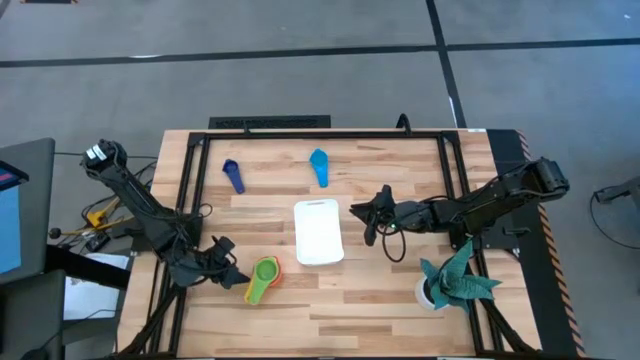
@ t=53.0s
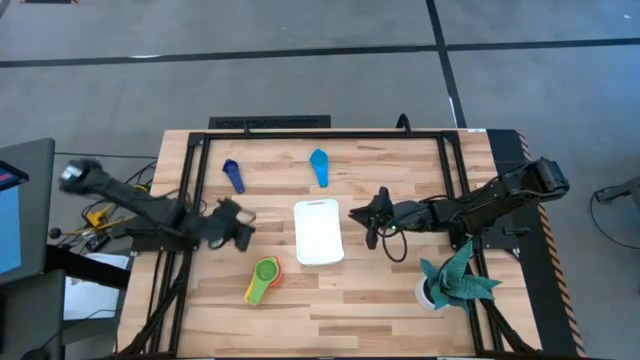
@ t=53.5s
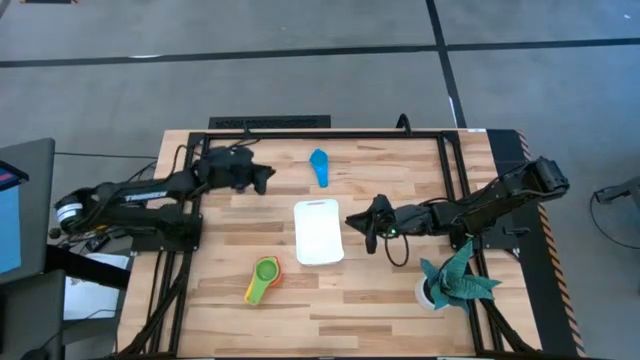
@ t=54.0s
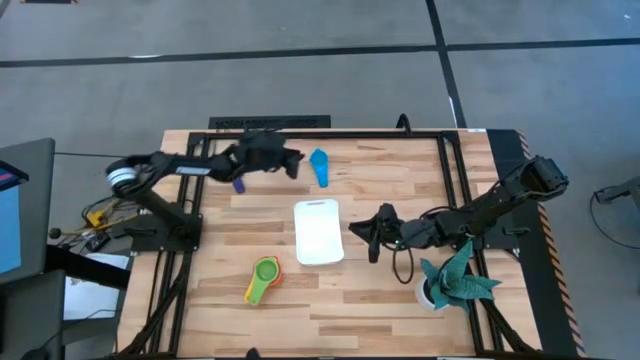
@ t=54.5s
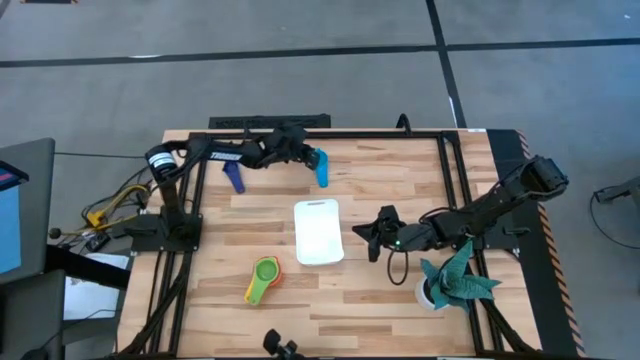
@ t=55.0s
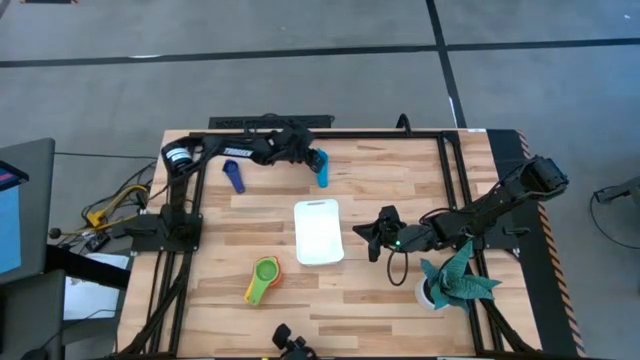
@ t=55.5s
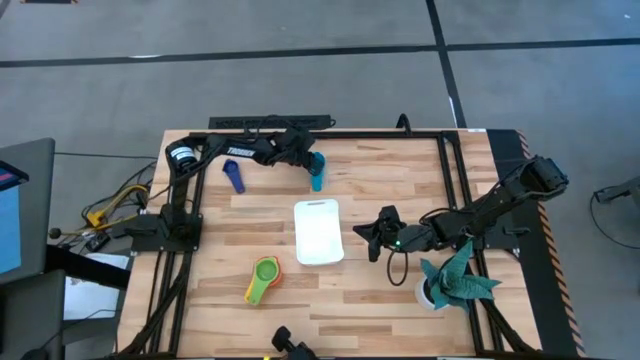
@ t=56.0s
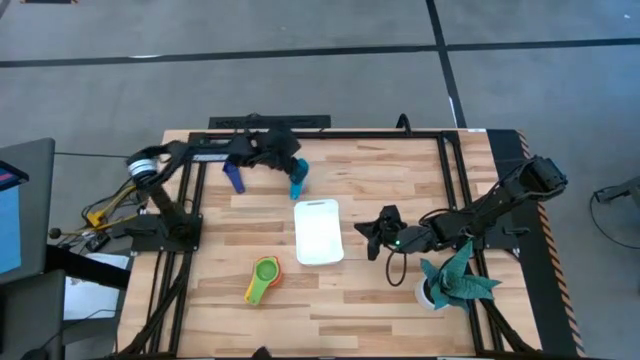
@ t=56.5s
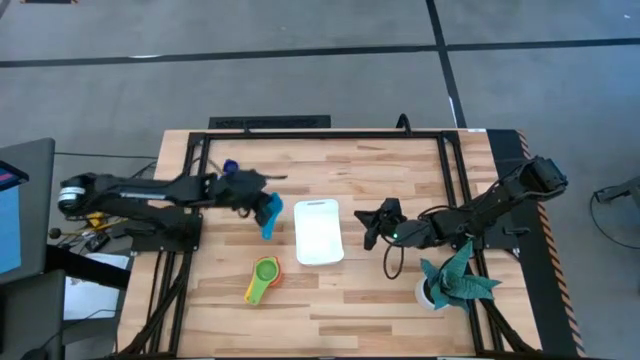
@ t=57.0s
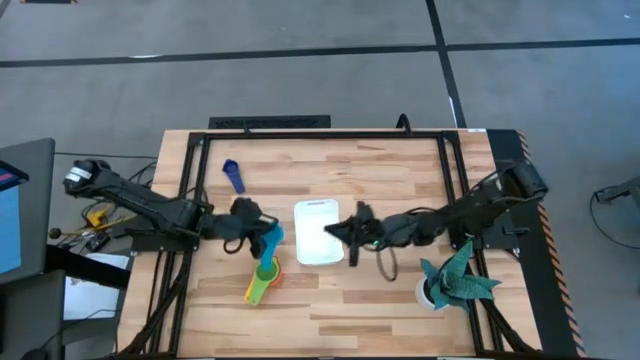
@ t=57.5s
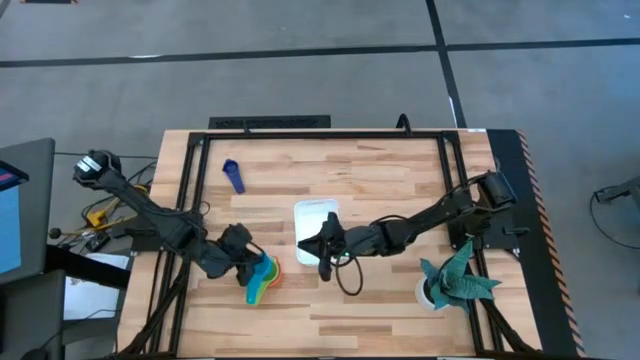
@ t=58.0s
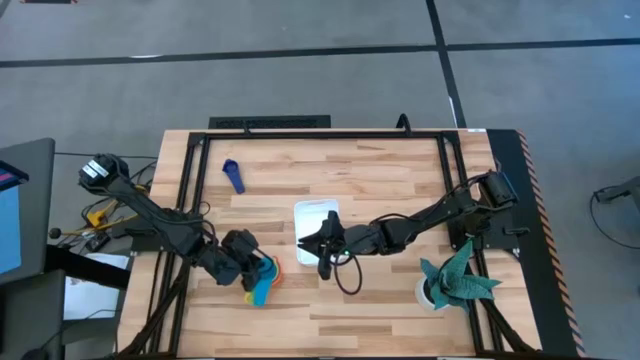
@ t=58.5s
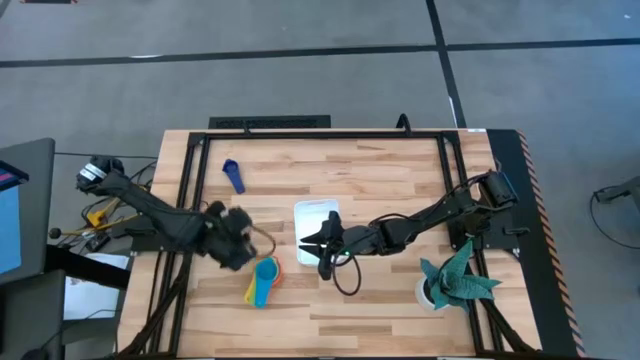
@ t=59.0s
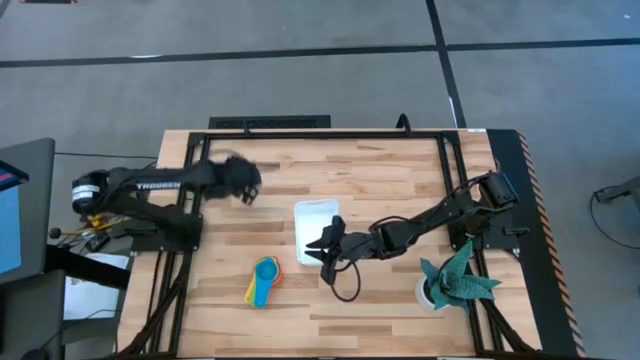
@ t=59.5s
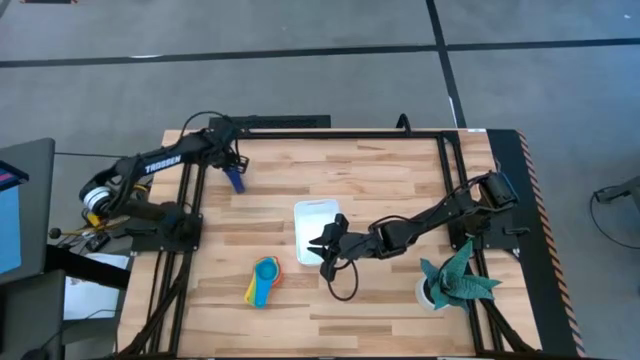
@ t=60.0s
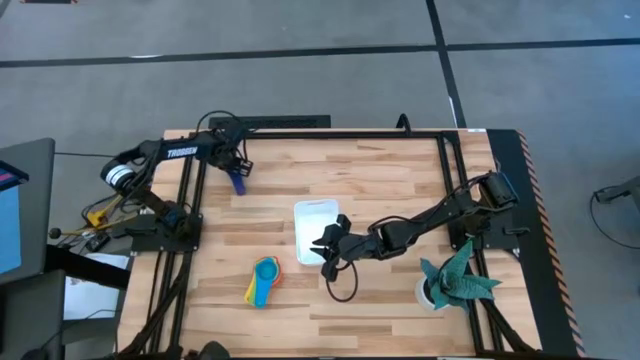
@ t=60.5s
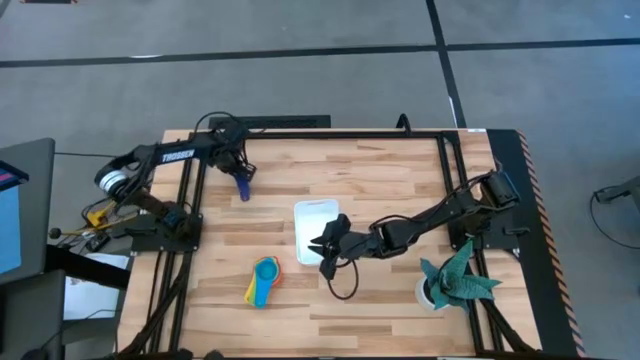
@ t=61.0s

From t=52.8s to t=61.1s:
Task: Nest measuring cups in basket
Stack the light blue nest measuring cup into the green nest measuring cup

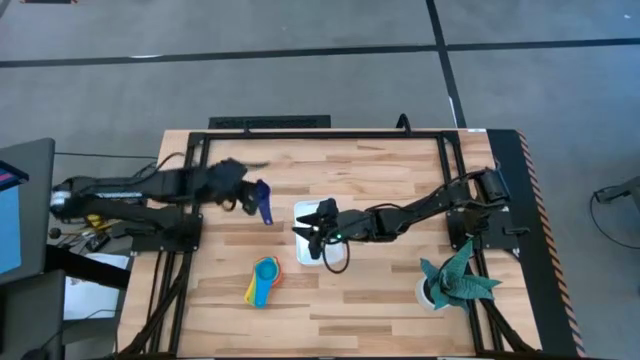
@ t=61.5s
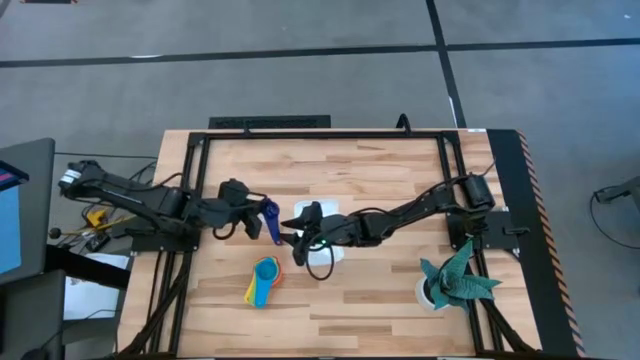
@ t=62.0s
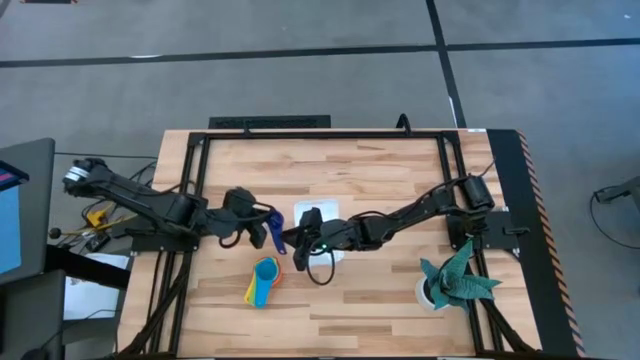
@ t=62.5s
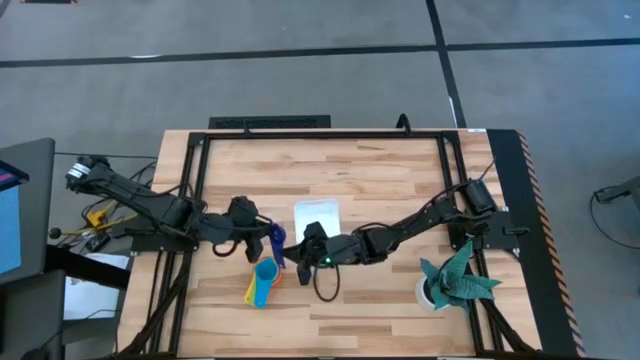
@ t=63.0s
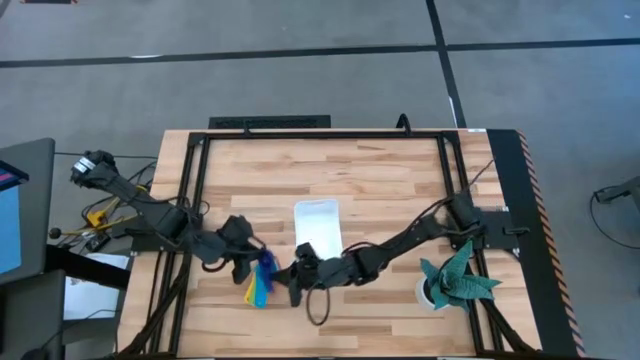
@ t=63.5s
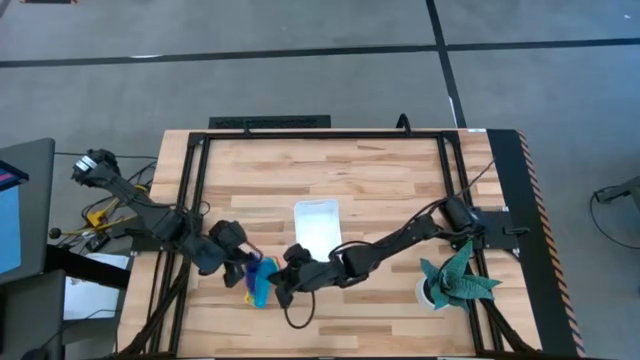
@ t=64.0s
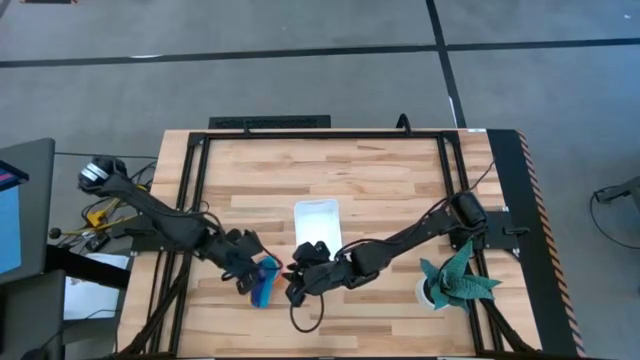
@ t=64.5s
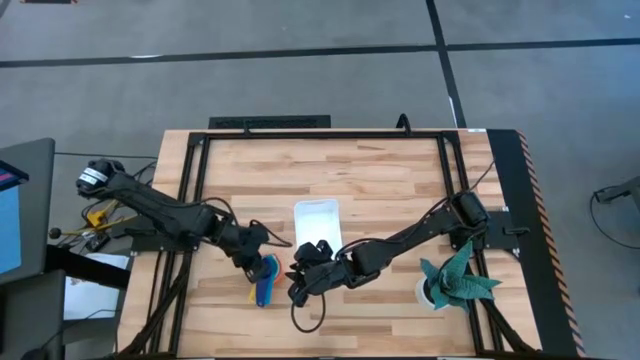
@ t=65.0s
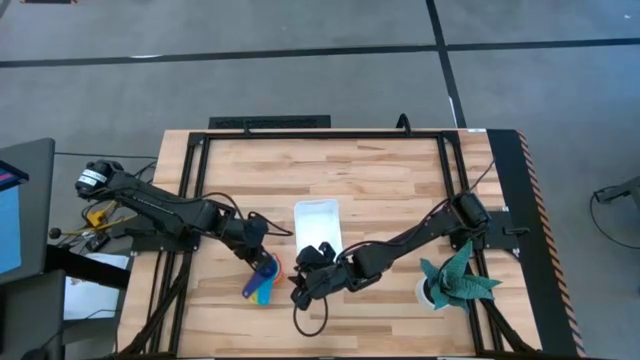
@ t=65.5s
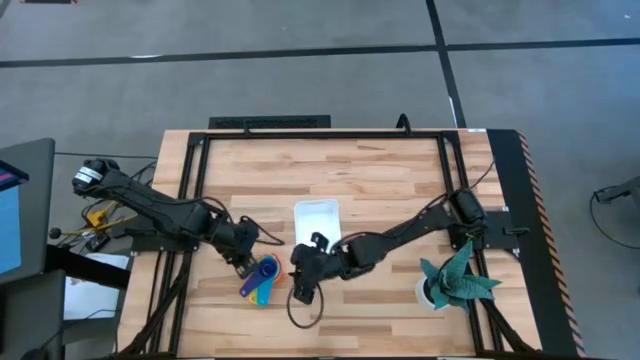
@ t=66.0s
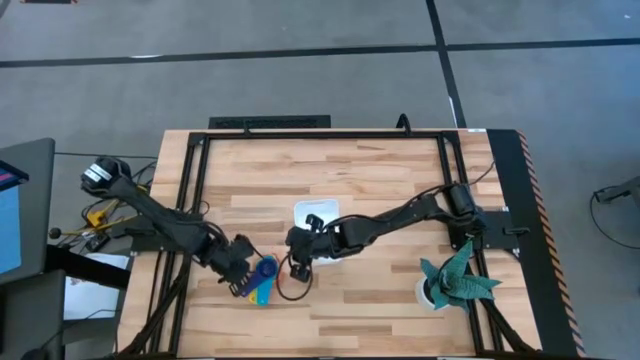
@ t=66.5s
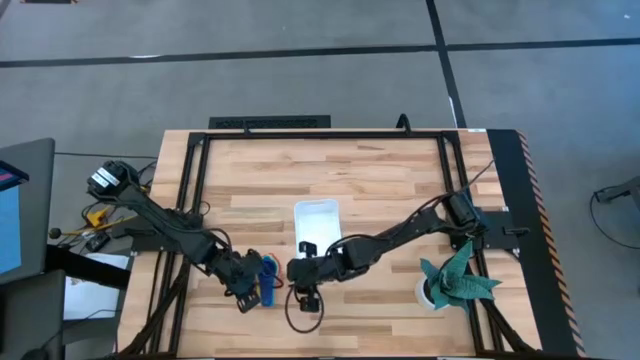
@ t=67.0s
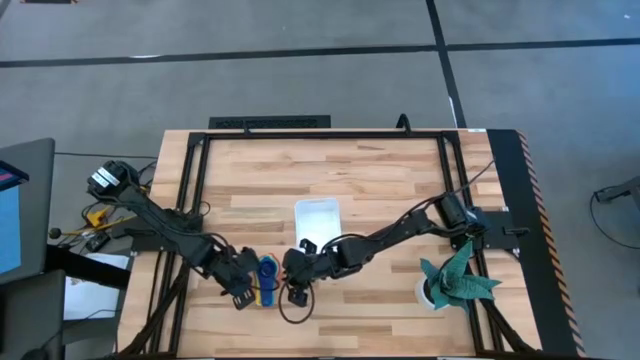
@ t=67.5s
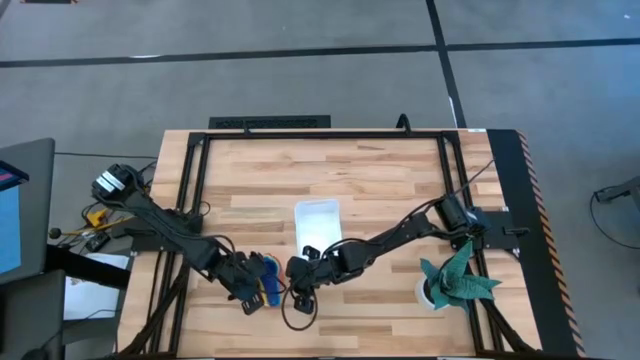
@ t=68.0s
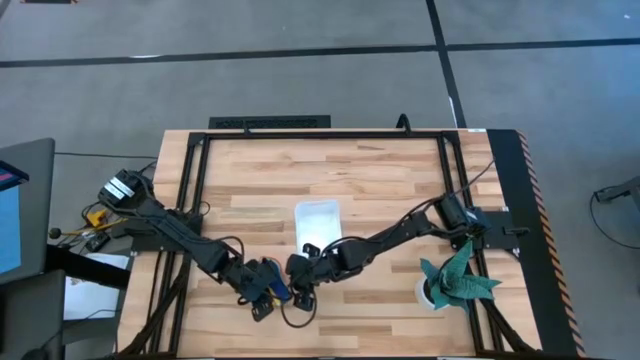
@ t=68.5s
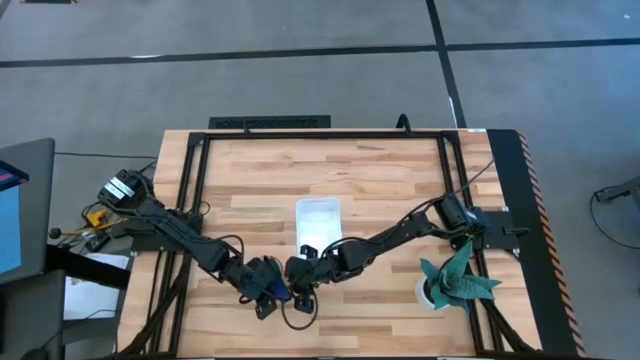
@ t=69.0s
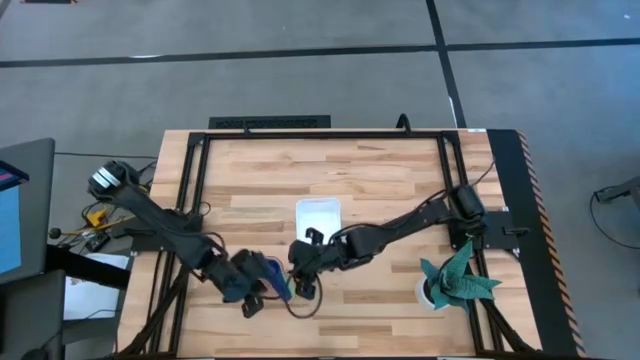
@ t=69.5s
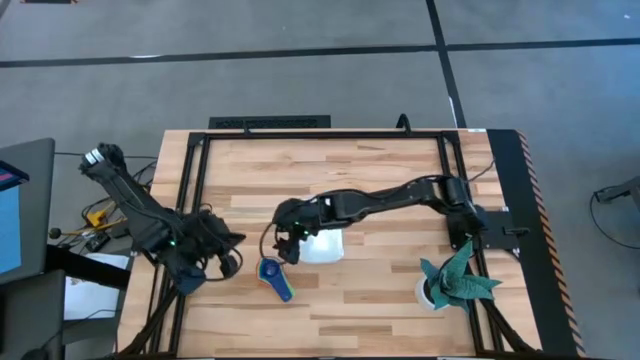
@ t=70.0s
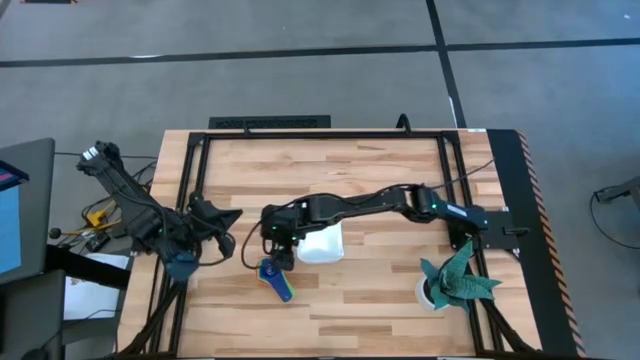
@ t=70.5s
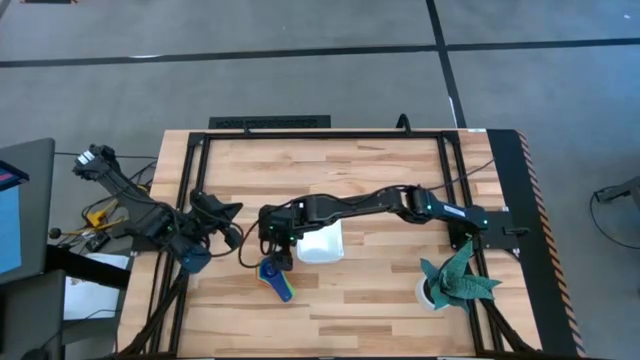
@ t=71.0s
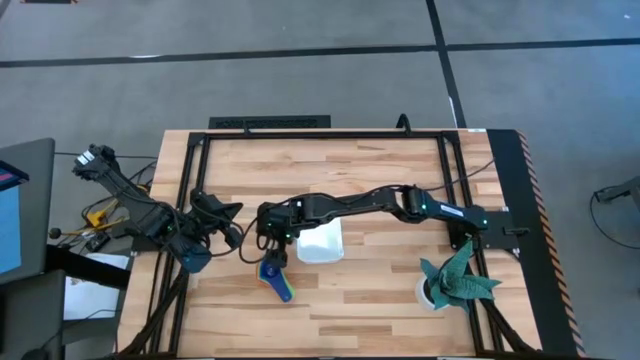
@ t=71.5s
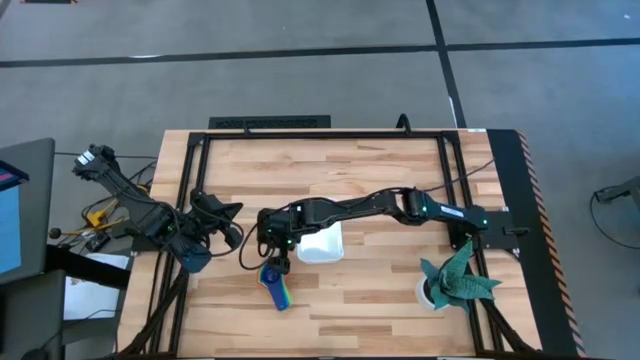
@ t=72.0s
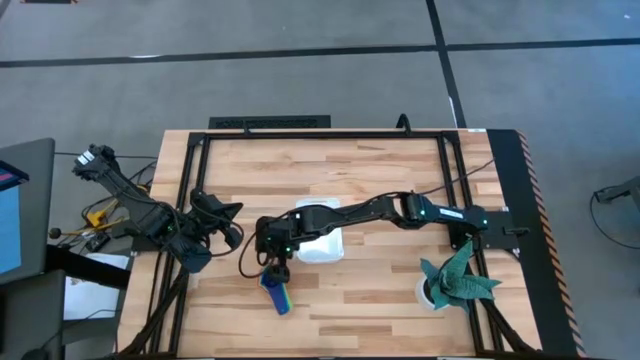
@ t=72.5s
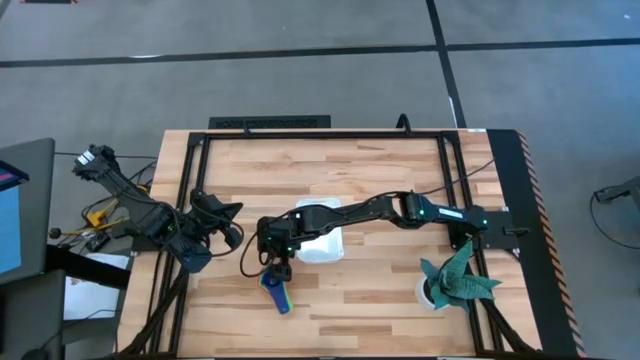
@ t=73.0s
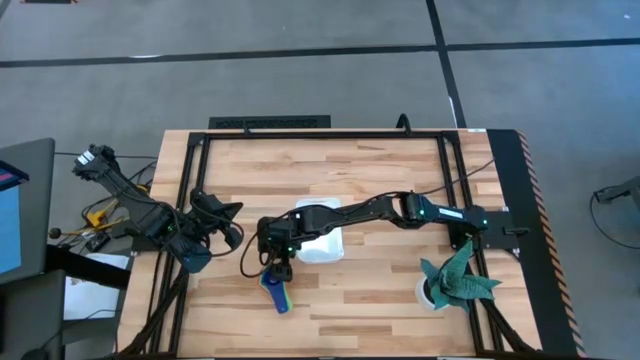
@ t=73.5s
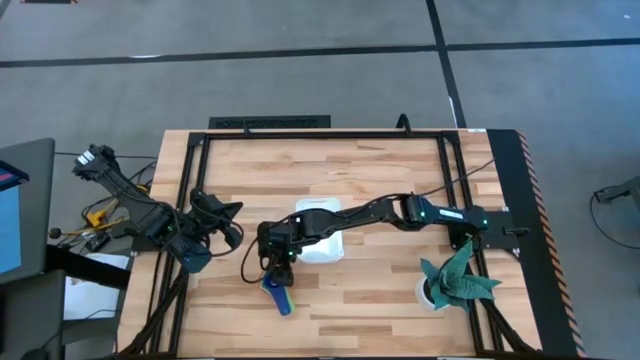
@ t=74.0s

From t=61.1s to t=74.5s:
Stack the dark blue nest measuring cup into the blue nest measuring cup
